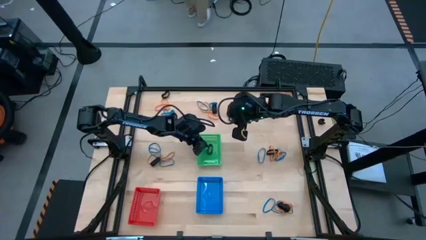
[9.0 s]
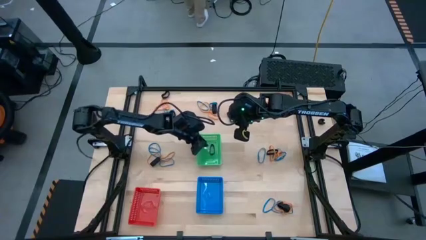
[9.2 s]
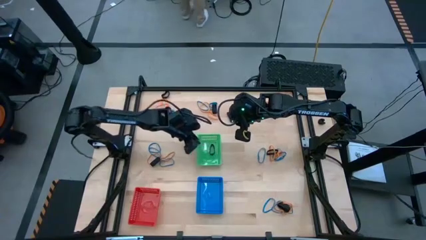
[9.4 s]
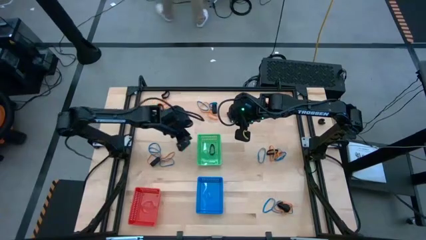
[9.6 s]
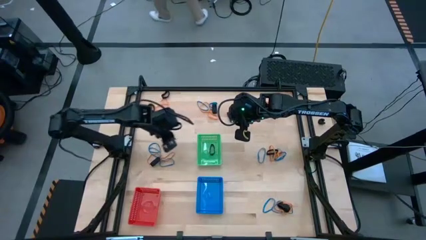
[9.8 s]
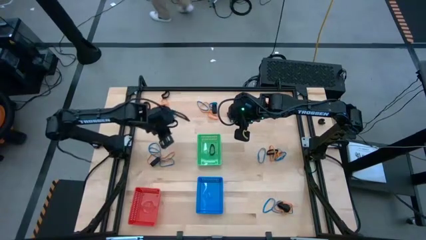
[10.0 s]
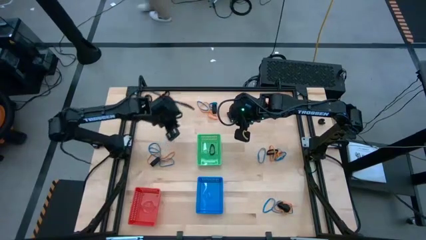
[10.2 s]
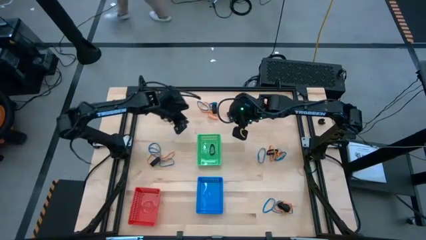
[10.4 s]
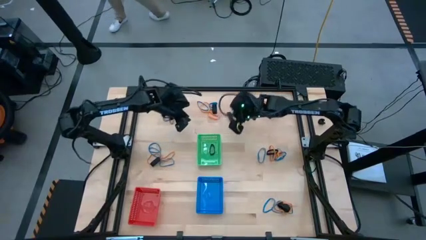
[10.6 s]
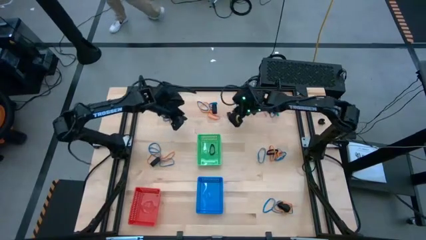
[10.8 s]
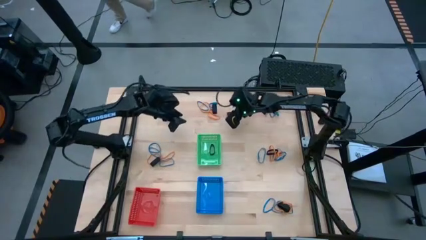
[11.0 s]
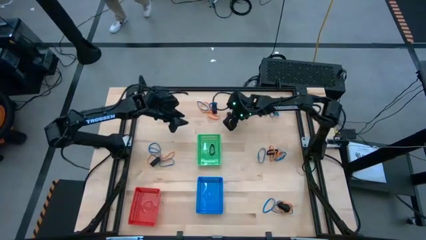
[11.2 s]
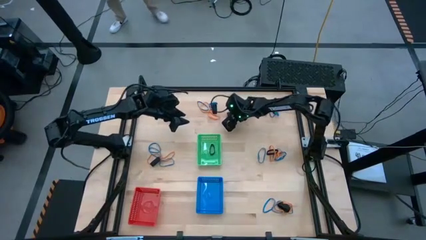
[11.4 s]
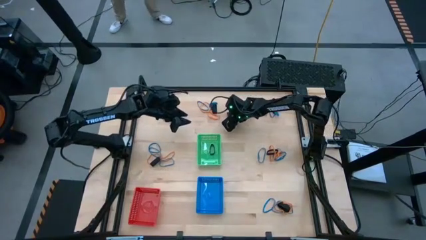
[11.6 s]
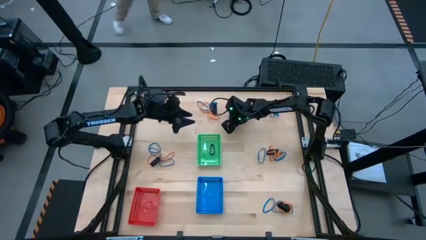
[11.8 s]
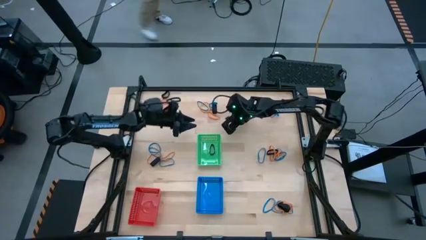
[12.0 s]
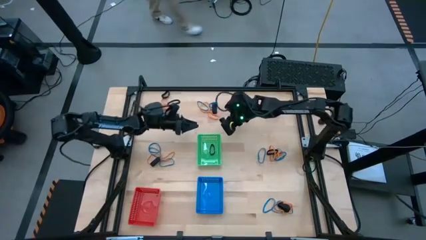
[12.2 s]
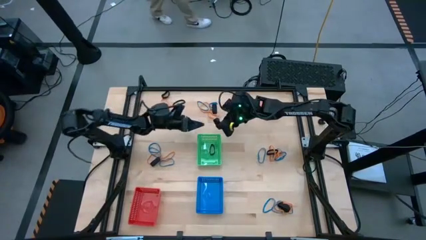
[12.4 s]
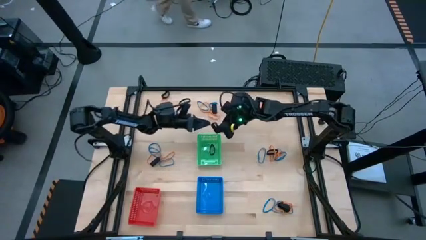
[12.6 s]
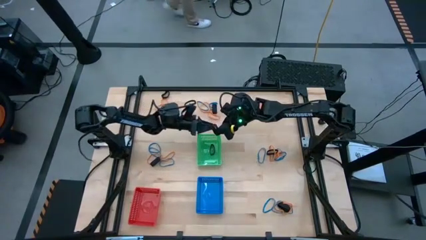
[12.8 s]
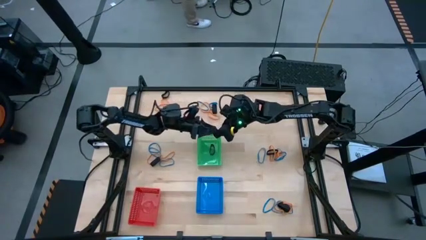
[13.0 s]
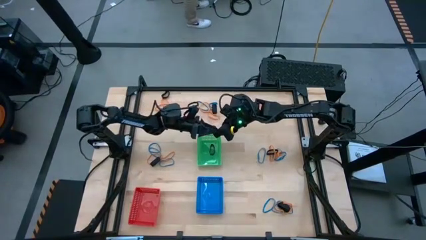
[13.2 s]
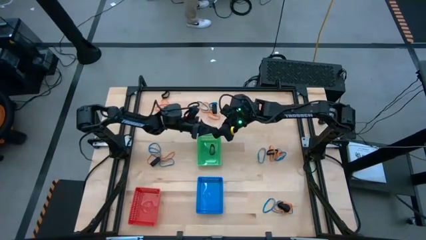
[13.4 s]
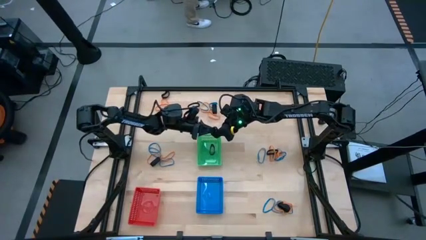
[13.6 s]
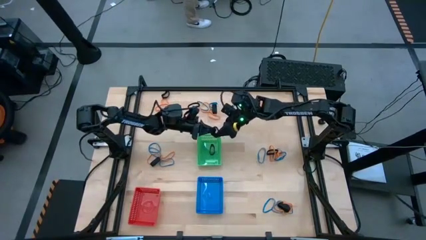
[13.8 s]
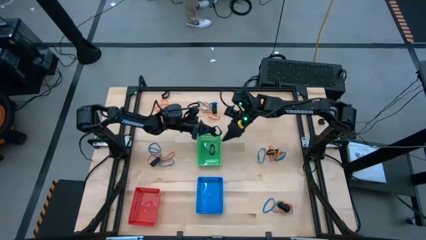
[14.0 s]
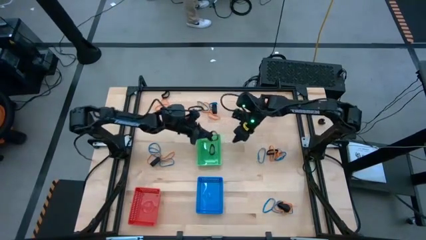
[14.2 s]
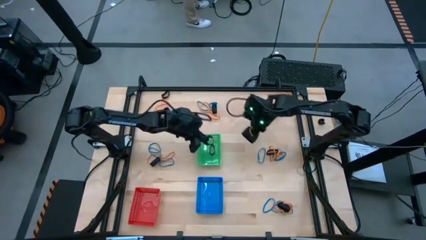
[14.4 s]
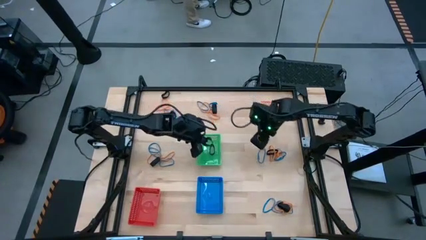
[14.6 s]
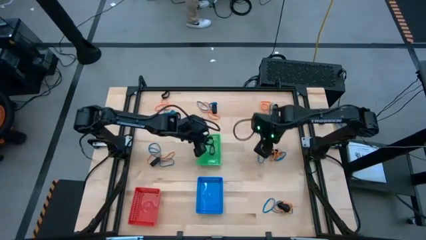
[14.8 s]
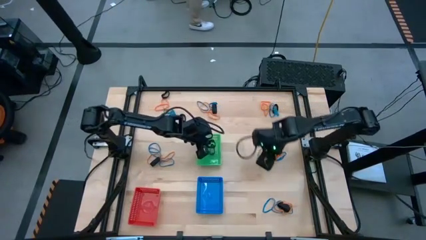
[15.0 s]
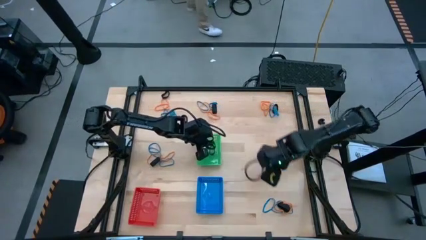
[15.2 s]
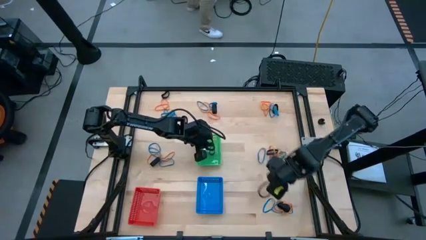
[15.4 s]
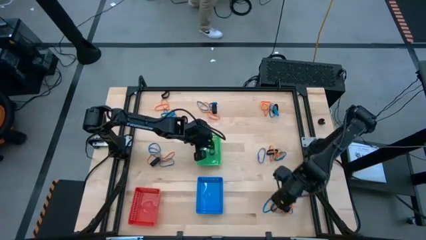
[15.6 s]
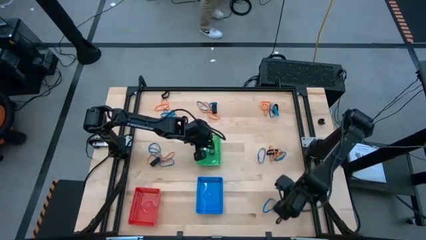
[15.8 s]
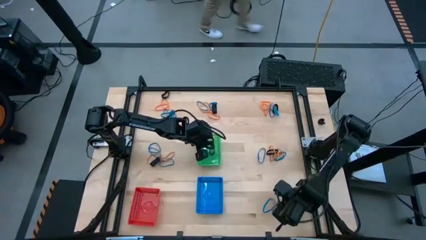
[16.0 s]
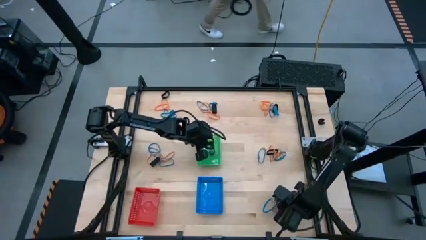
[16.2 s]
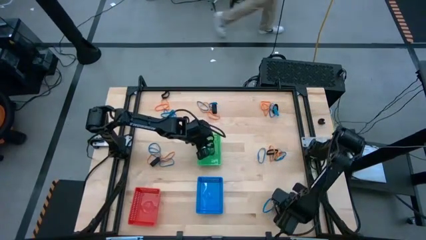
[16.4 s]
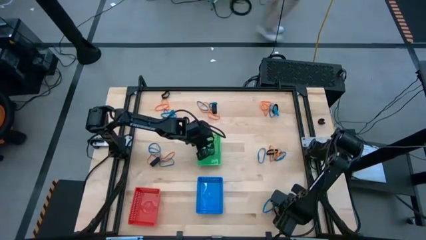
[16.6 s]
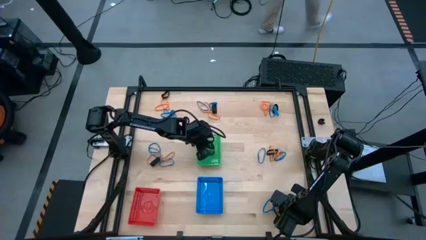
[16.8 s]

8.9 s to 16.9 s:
Task: Sort rubber bands into baskets
Put the black rubberband into the green bin

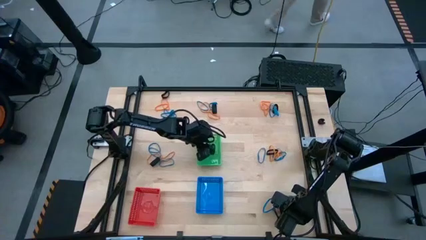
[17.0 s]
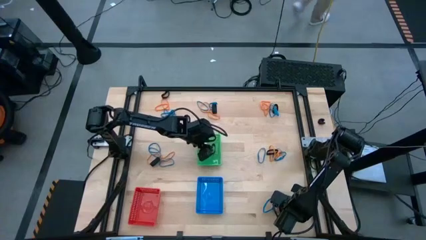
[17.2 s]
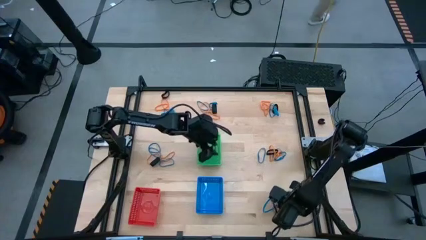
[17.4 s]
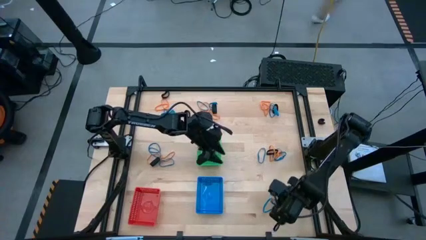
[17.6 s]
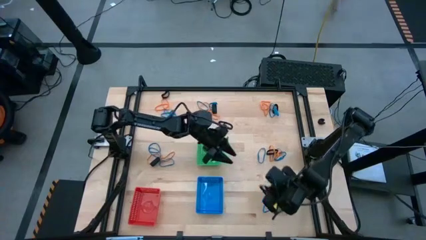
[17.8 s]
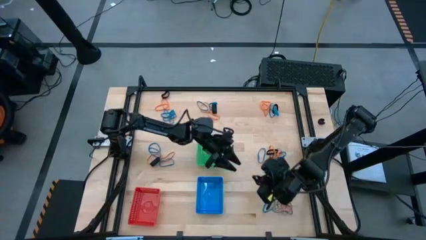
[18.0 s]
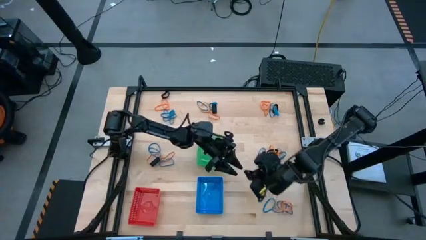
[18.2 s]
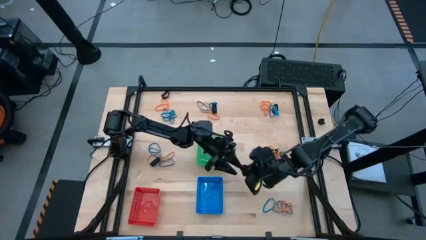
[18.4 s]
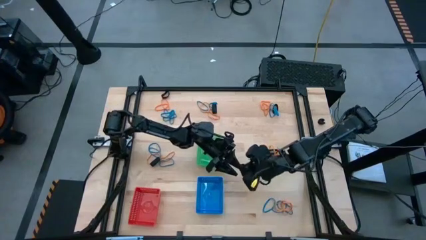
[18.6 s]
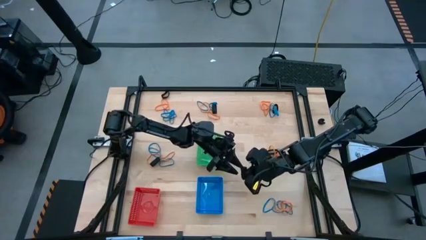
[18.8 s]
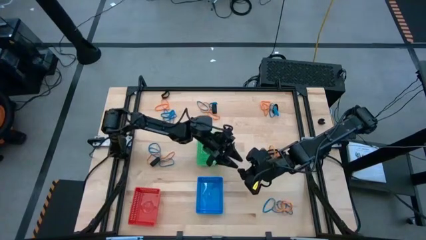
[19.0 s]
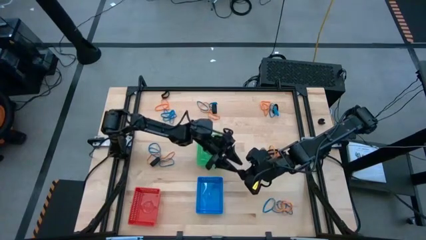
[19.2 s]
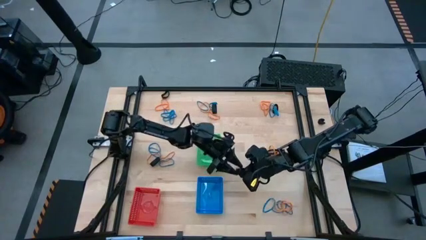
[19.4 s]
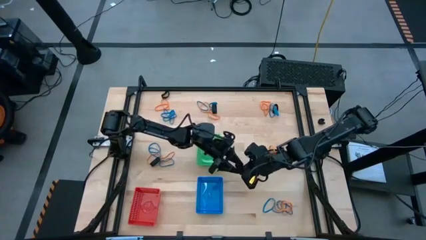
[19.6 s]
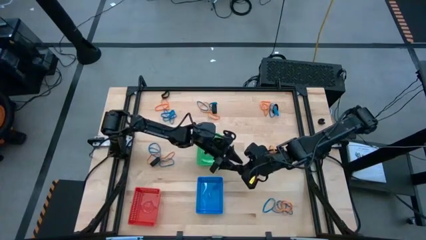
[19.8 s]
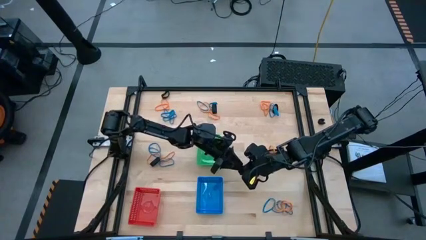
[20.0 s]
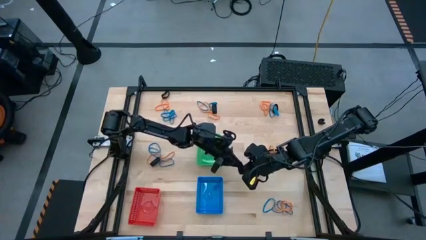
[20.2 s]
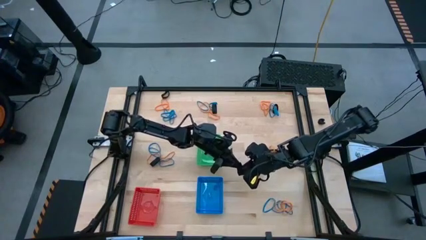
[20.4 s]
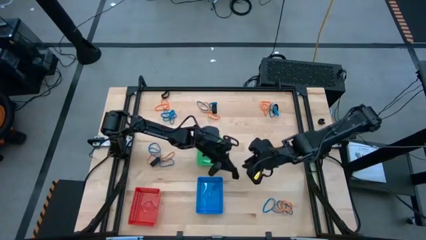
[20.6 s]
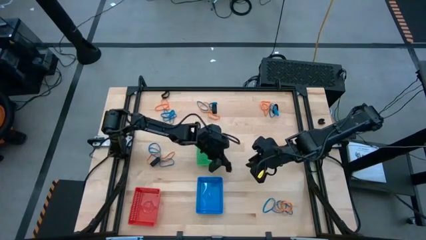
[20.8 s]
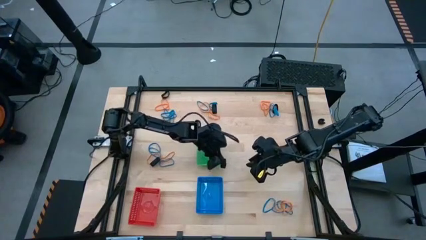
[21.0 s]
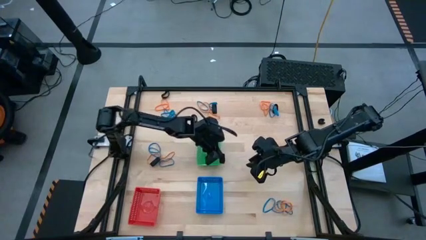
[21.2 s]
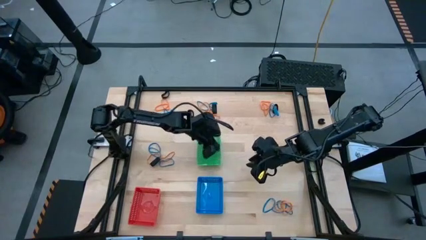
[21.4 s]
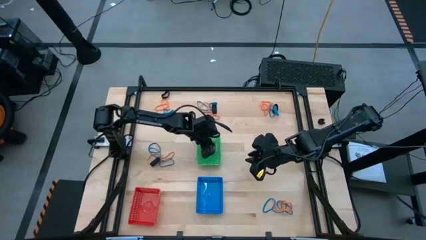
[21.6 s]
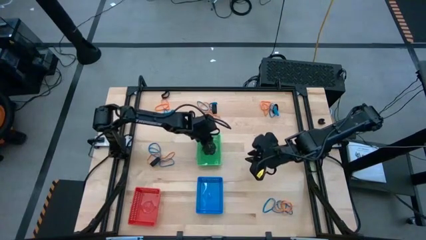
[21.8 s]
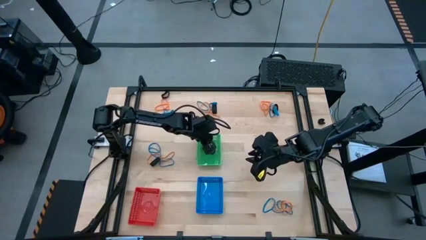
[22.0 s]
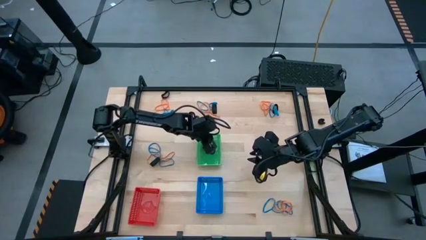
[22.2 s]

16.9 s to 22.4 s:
Put the black rubberband into the green bin

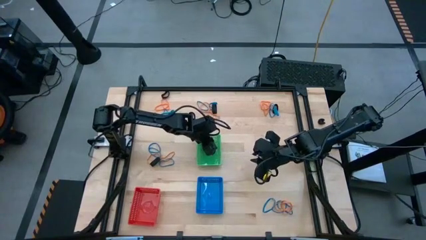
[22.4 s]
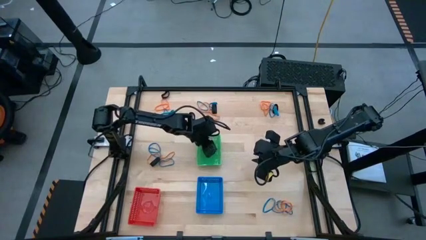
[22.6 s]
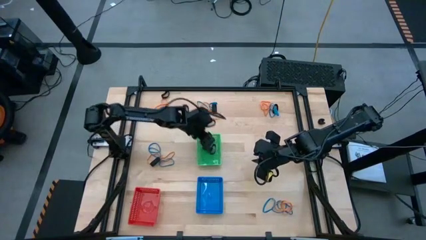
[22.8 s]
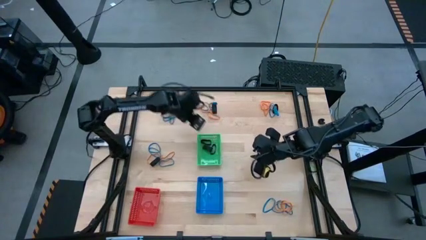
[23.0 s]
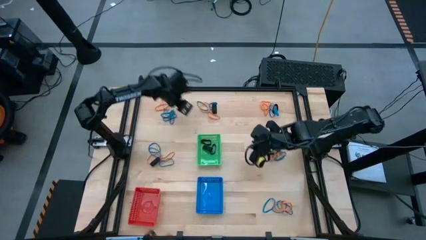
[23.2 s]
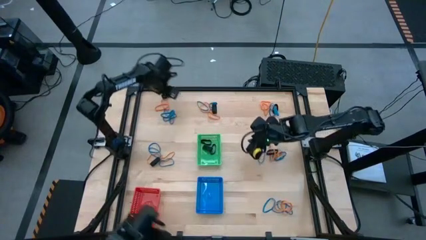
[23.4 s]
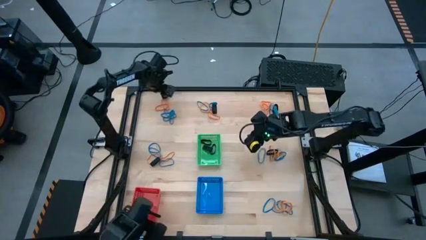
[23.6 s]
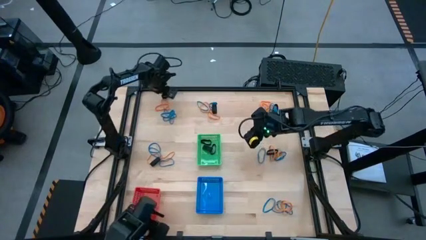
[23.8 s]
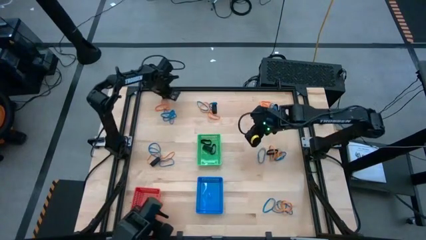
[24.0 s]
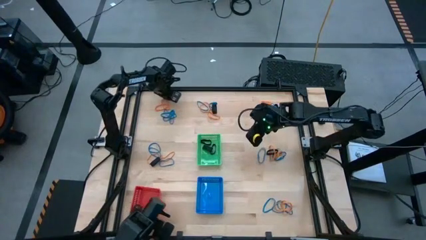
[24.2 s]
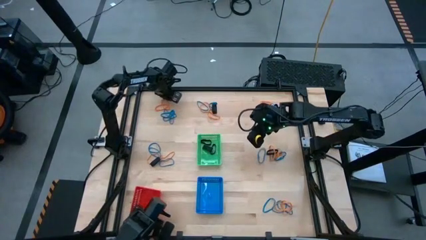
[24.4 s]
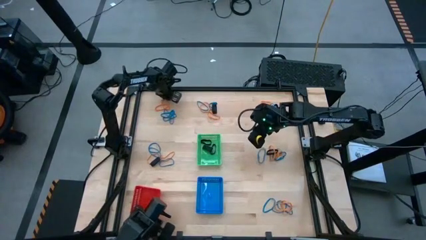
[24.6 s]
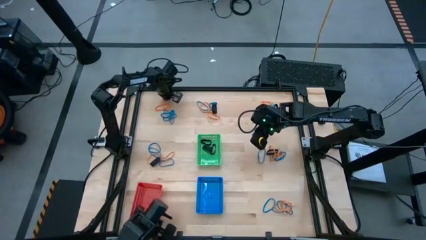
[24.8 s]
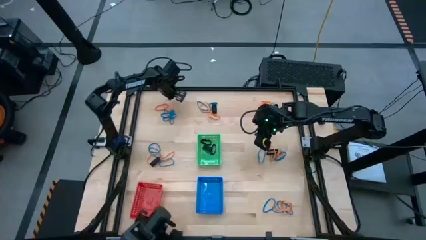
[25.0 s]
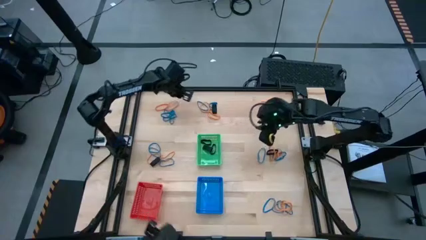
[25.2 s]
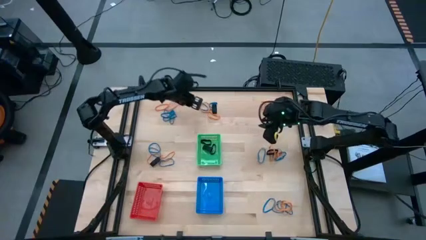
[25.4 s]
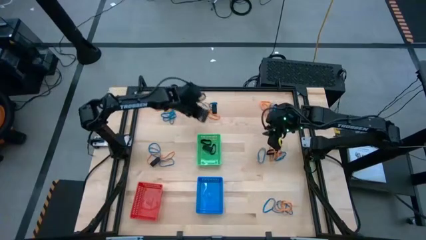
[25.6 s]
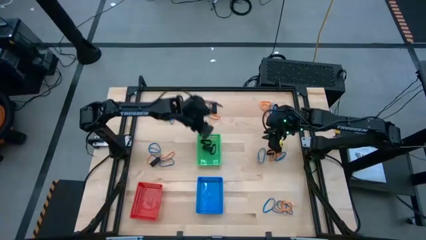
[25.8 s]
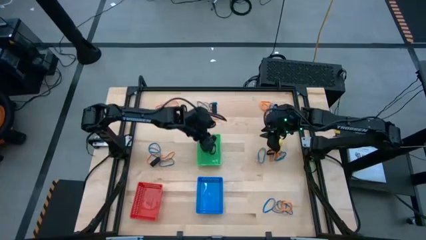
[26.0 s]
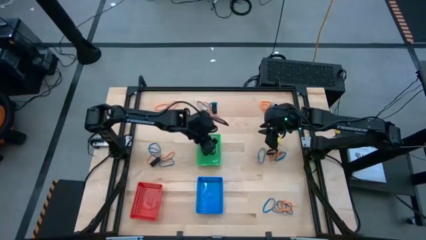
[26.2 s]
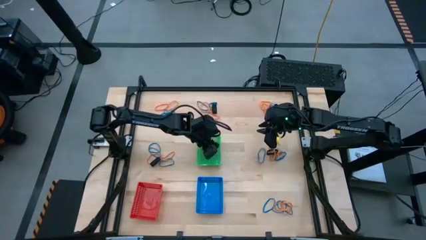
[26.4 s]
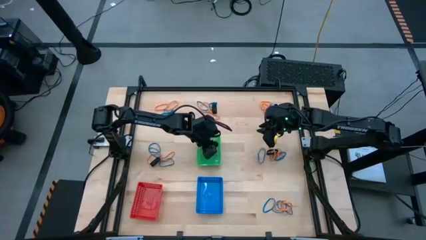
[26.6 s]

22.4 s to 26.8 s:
Put the black rubberband into the green bin
